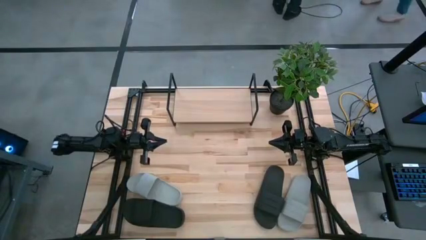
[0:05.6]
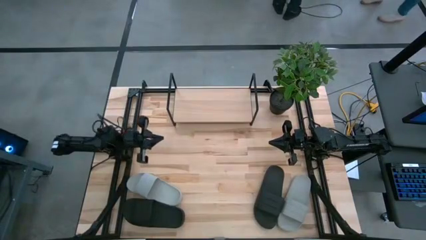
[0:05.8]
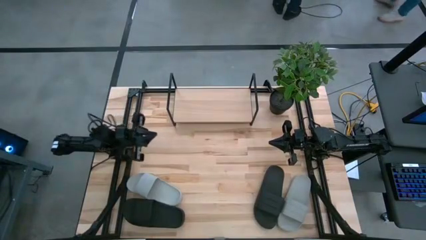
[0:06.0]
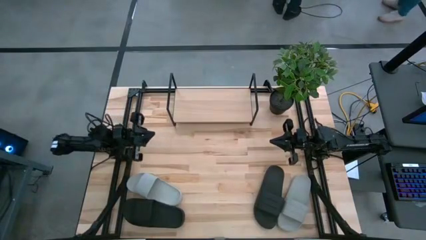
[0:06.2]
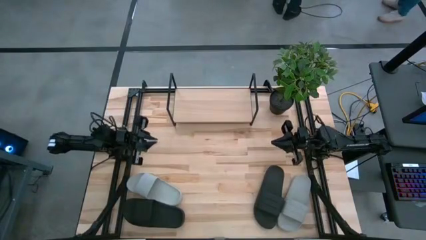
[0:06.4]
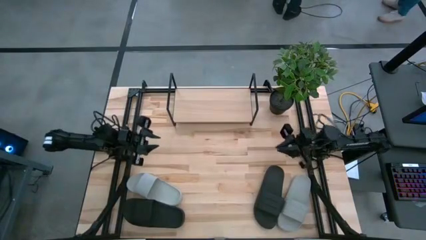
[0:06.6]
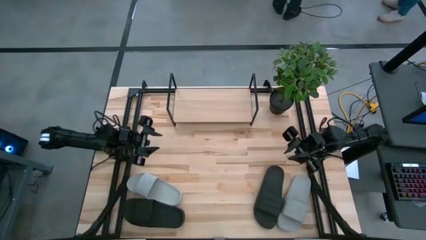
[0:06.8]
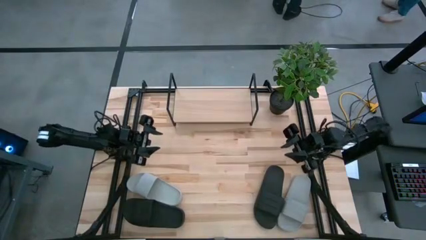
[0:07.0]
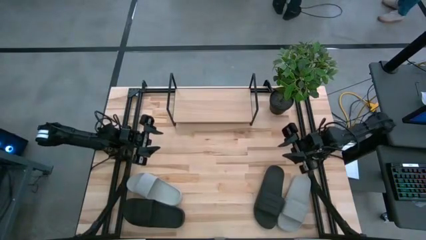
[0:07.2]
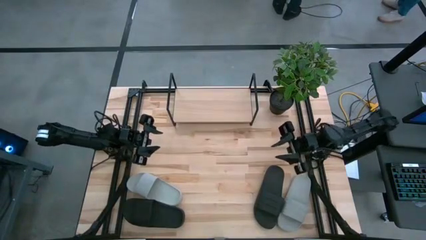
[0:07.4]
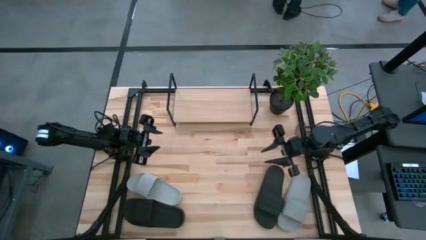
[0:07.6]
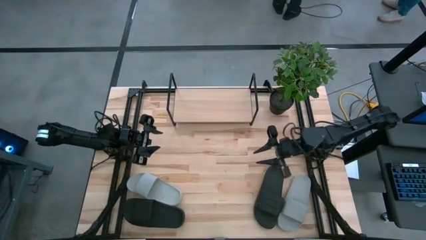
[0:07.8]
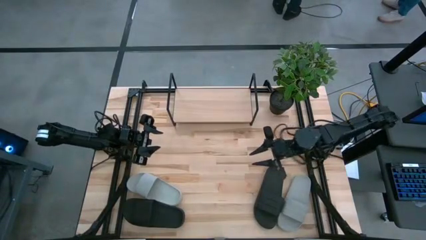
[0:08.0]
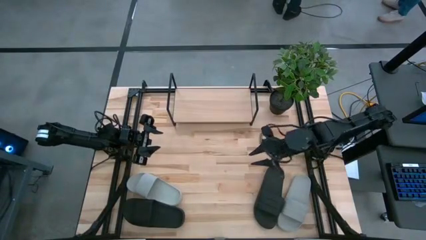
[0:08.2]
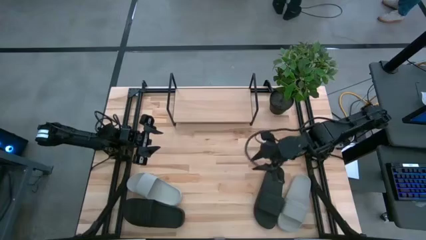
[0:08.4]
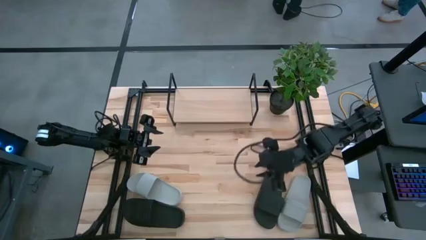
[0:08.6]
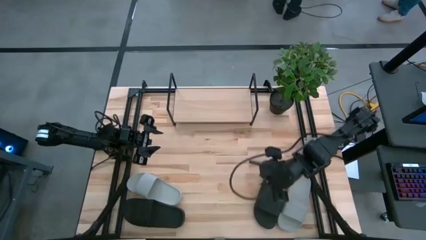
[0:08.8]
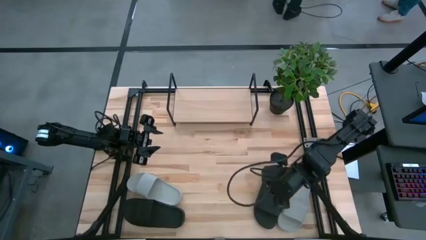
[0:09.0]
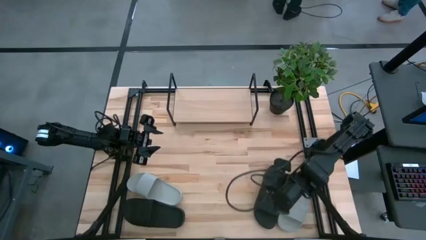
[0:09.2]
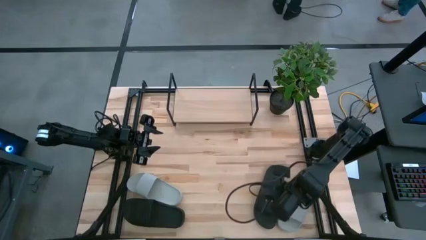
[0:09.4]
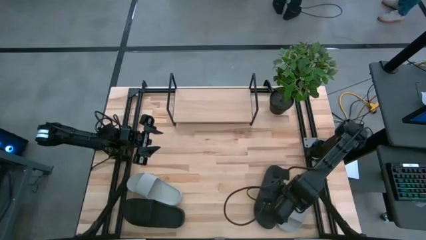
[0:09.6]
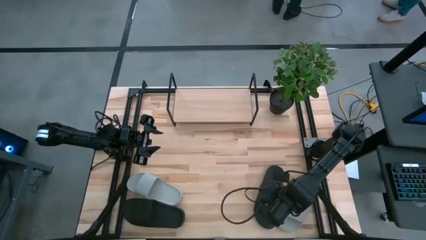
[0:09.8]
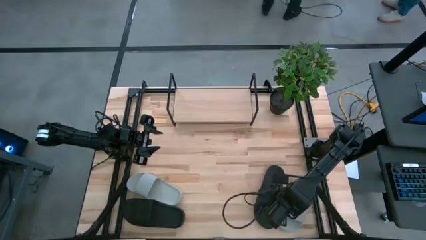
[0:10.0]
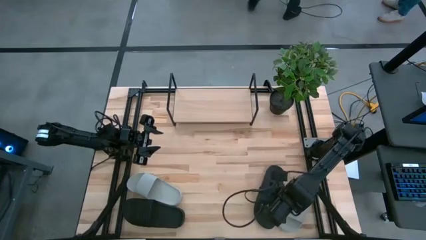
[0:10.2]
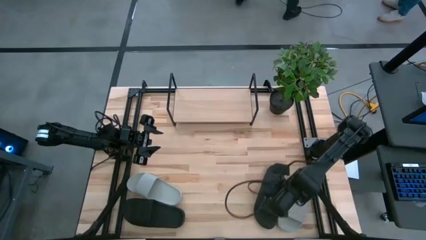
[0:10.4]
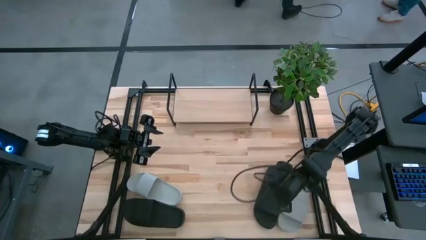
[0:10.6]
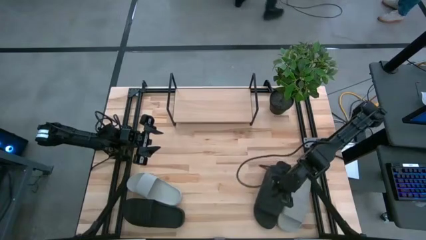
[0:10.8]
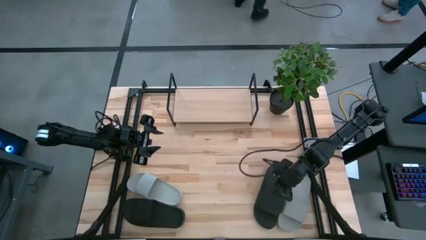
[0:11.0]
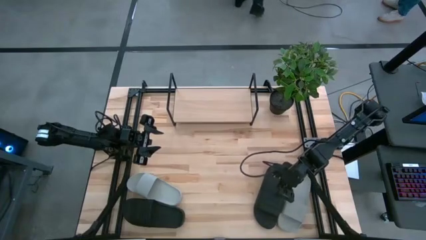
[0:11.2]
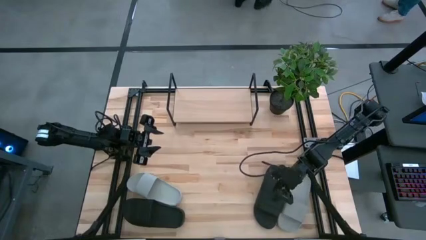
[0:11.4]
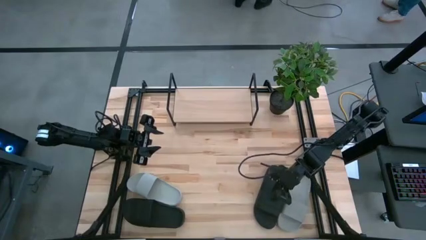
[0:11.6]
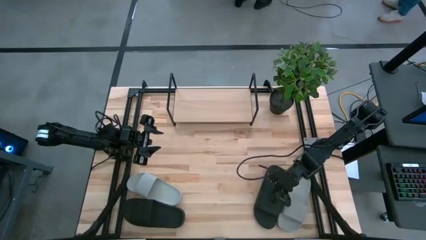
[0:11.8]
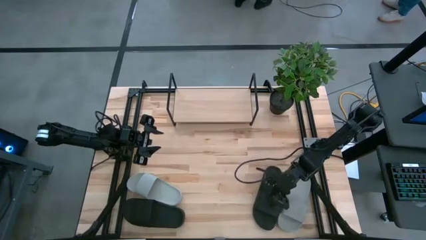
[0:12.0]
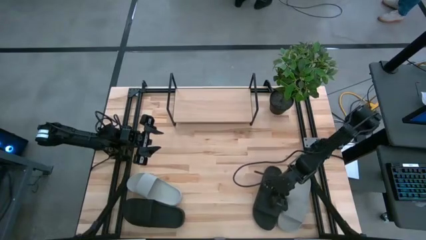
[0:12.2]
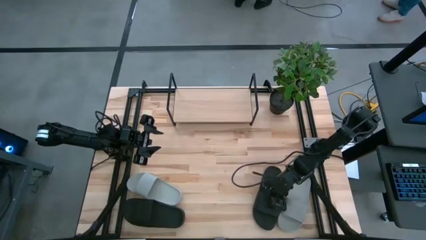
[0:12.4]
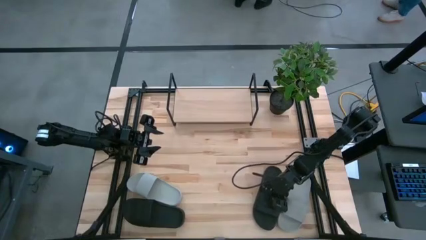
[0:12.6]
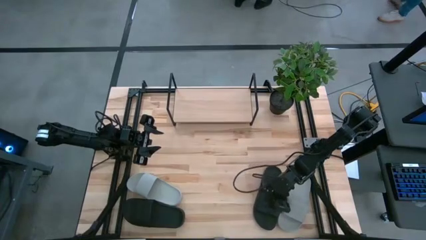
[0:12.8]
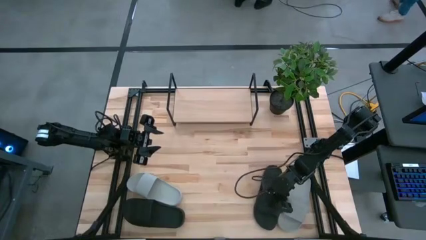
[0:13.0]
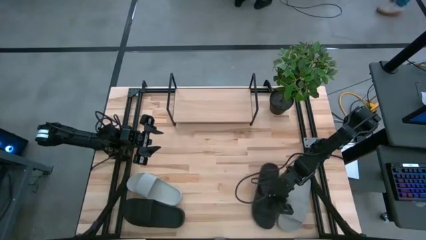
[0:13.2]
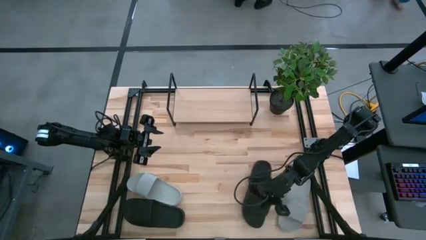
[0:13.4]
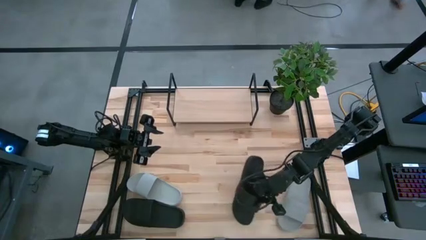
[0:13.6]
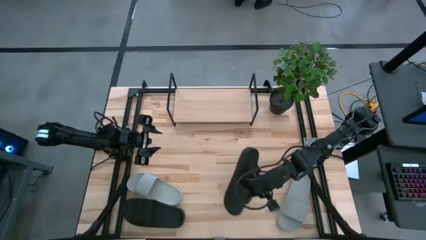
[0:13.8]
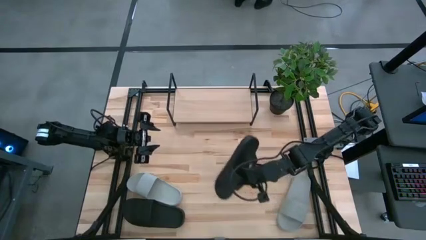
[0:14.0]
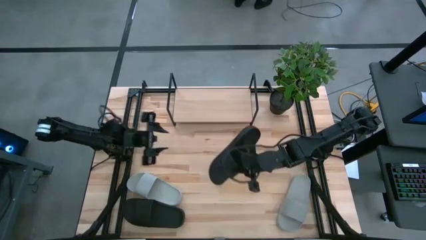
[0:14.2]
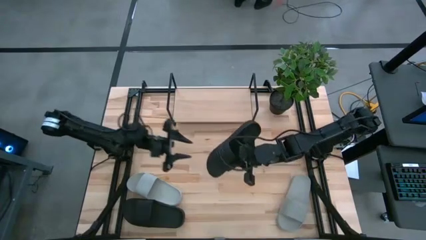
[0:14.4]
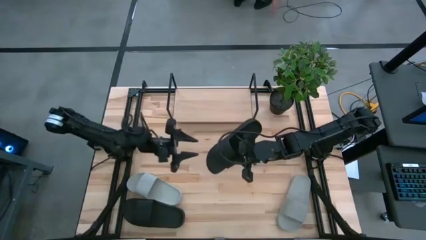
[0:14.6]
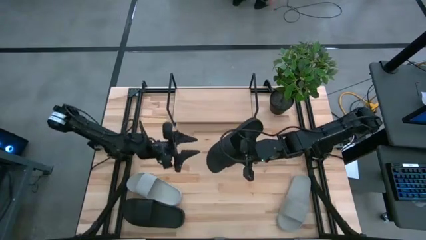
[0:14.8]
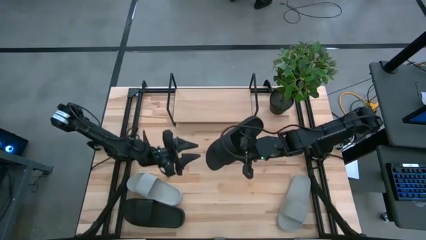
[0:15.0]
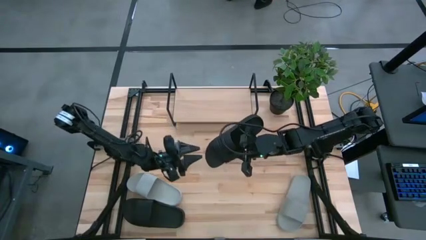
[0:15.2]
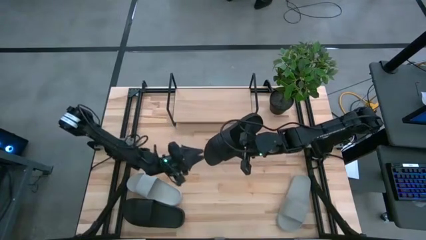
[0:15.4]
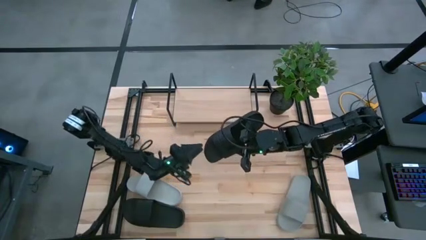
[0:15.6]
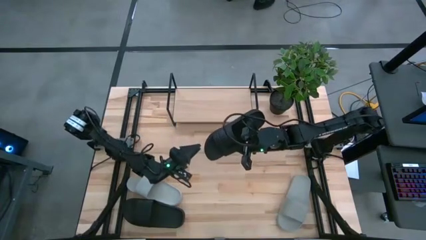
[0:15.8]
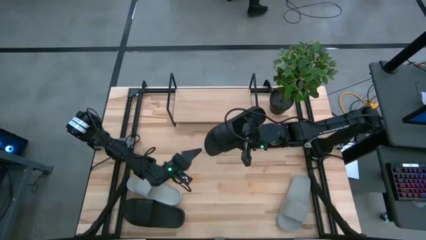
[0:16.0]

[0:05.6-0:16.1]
Task: Pick and place slides into the shelf
Put the right black slipper on the shelf

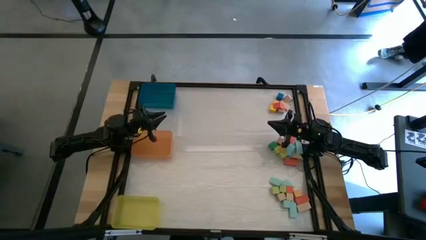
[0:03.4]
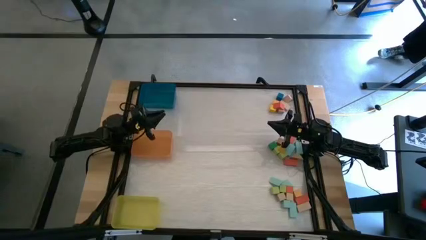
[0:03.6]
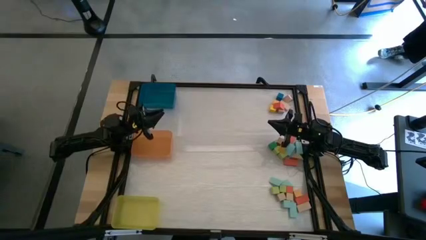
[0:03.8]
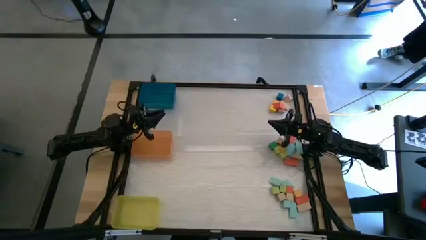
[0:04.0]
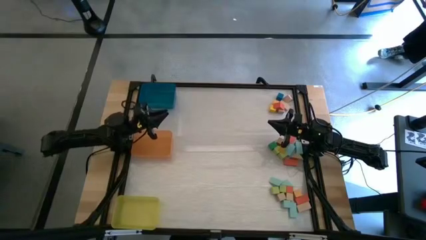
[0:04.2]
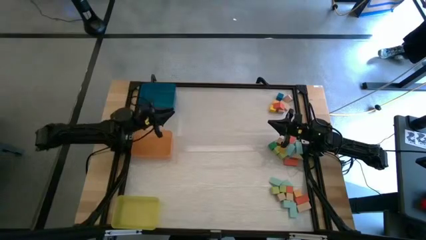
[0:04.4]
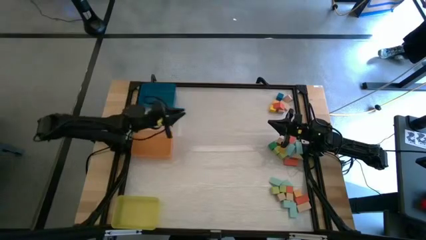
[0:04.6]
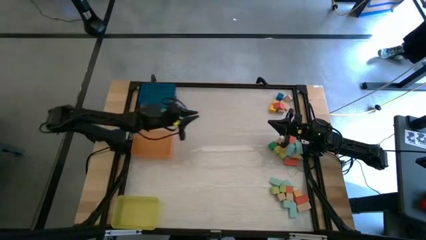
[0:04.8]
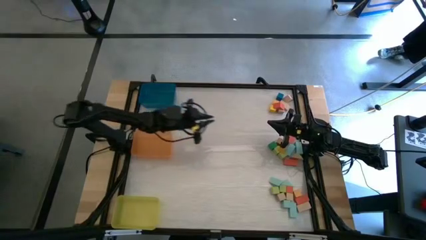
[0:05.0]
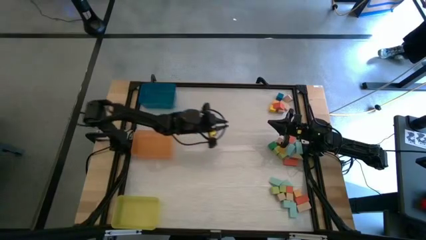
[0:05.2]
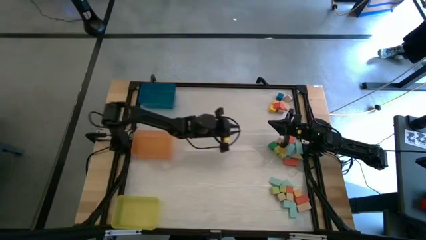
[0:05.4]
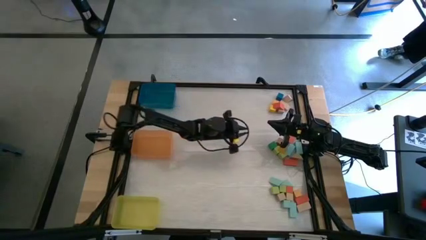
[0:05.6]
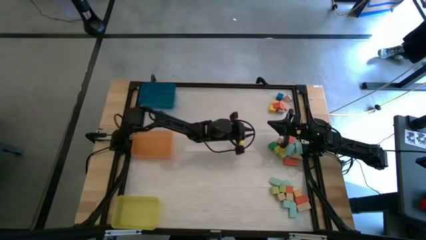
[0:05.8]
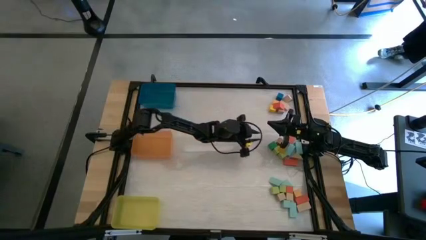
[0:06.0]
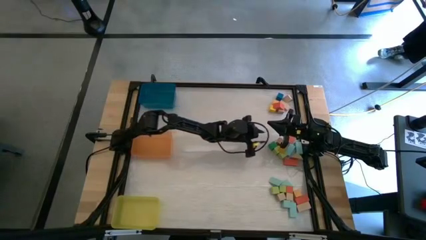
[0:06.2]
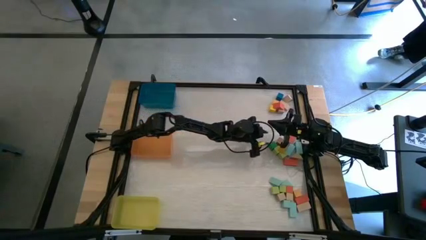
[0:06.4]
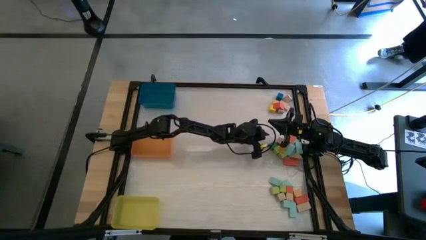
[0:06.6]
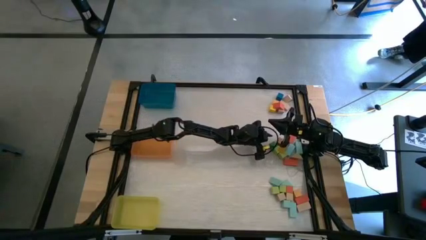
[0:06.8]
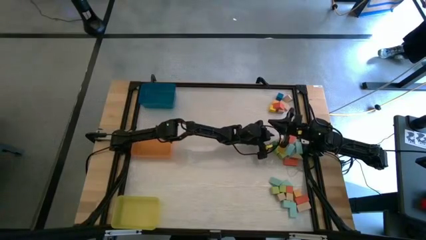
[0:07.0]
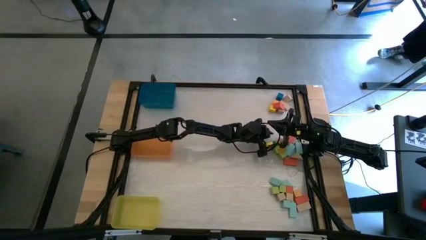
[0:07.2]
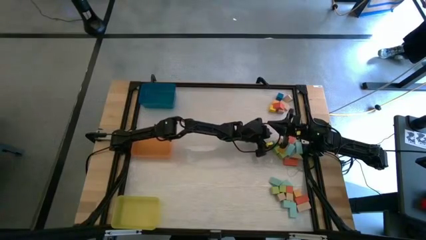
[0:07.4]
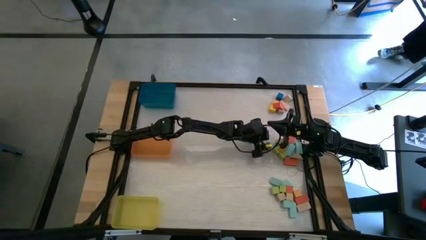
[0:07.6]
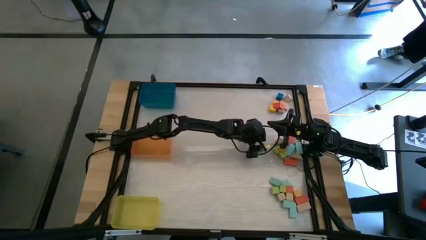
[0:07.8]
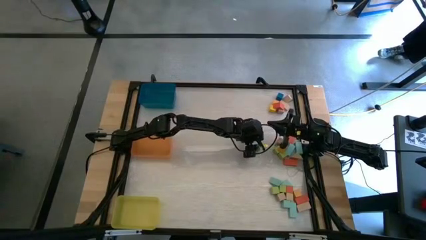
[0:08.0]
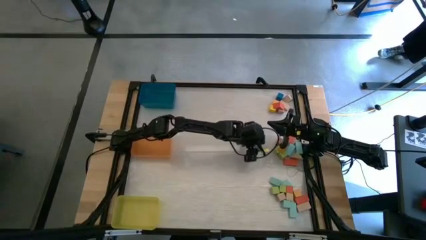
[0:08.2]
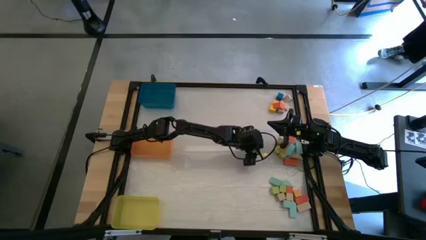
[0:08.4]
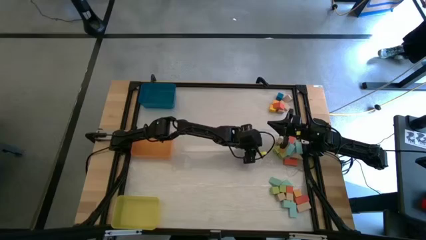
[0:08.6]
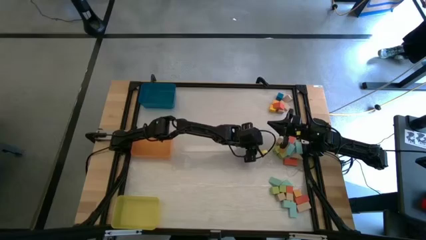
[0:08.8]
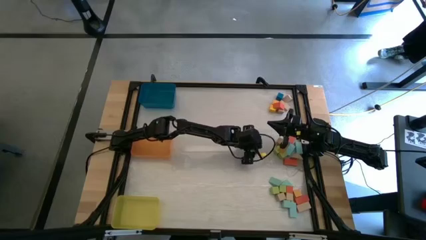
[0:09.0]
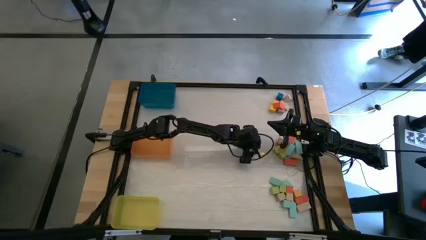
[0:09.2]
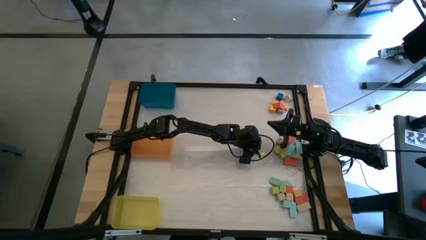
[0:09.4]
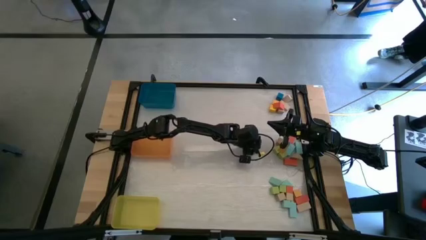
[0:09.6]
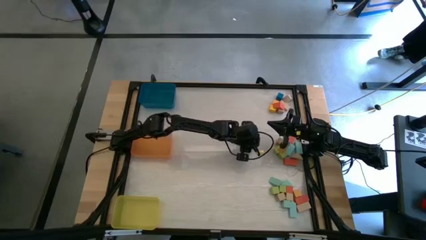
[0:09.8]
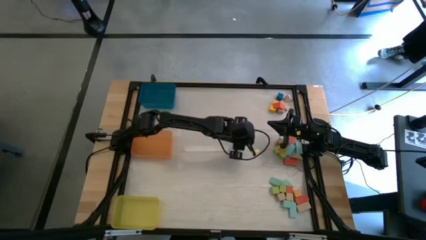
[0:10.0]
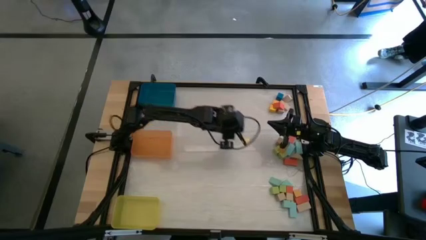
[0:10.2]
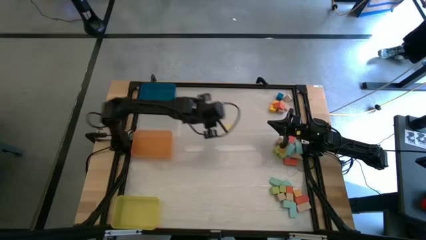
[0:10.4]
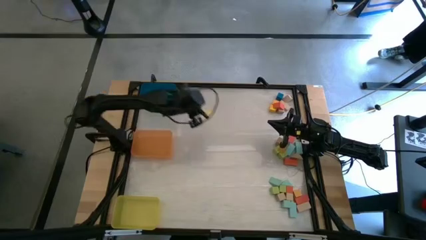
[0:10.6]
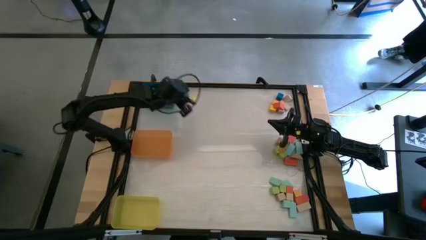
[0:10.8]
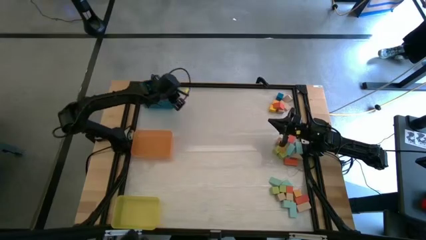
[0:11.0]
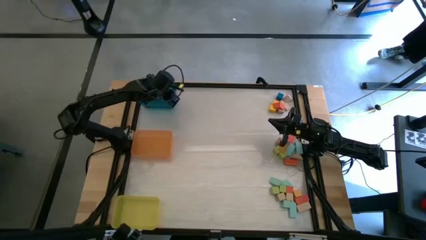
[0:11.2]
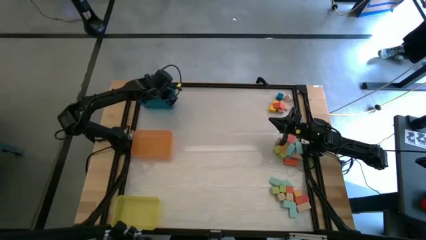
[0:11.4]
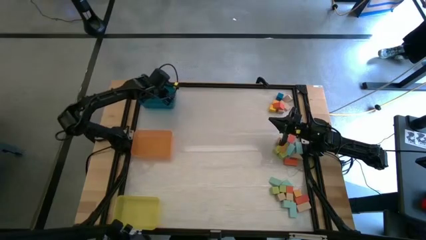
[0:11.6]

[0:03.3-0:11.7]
Task: Sort blocks by size
Put the green cube block into the blue bin
